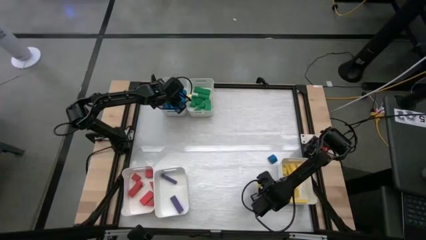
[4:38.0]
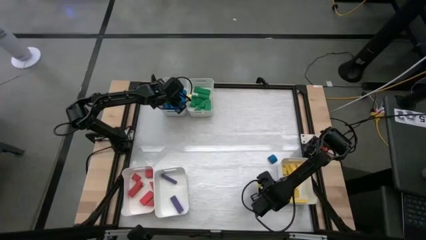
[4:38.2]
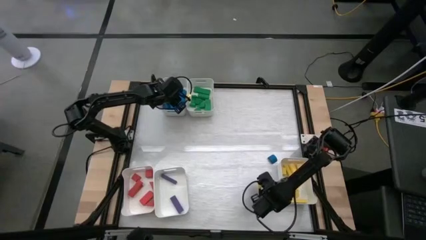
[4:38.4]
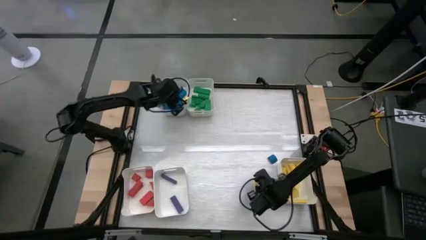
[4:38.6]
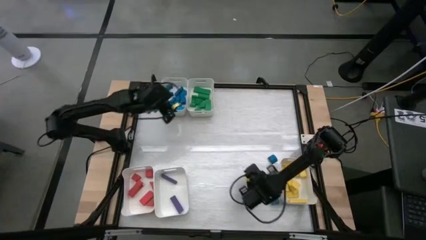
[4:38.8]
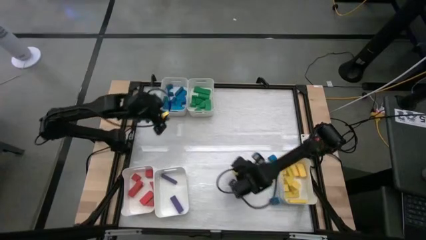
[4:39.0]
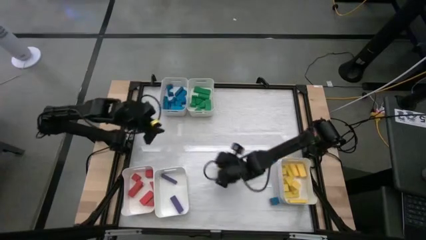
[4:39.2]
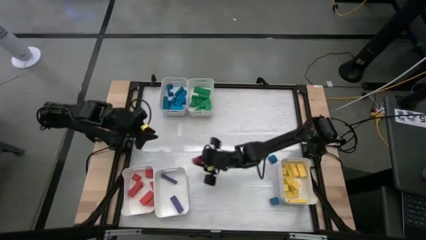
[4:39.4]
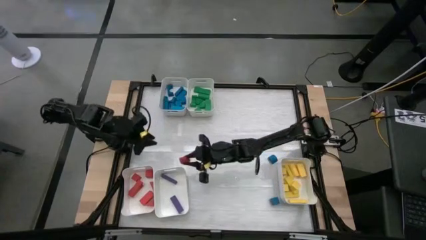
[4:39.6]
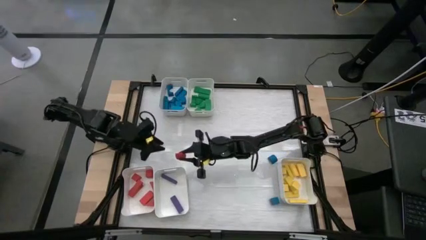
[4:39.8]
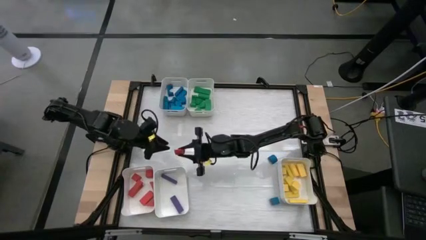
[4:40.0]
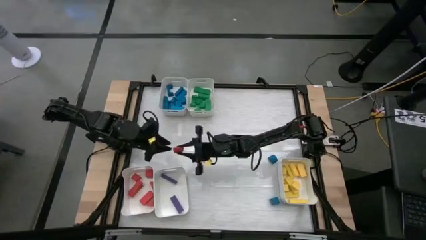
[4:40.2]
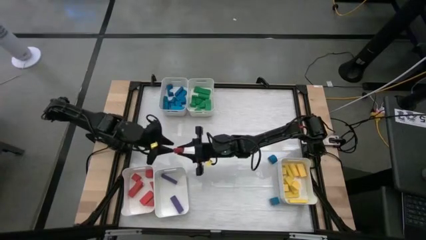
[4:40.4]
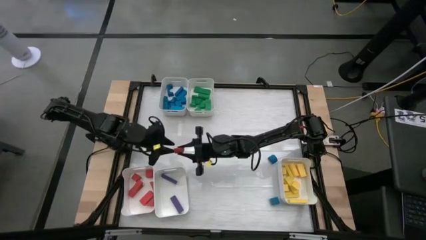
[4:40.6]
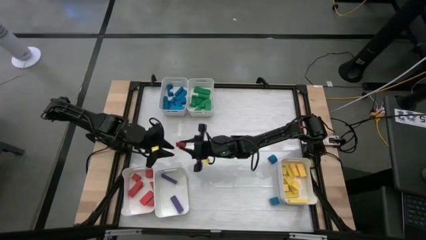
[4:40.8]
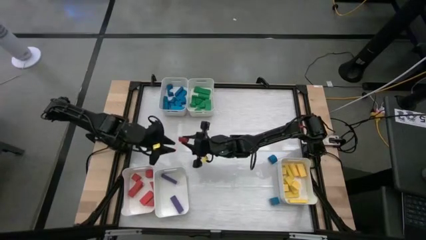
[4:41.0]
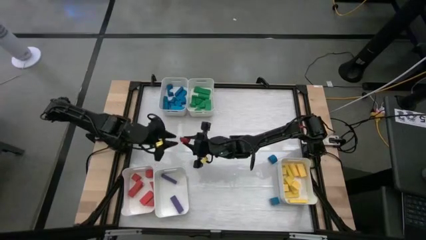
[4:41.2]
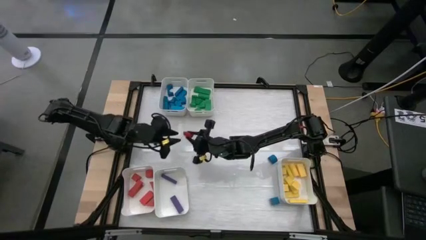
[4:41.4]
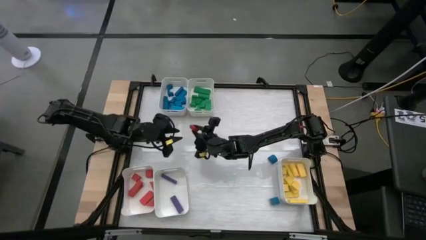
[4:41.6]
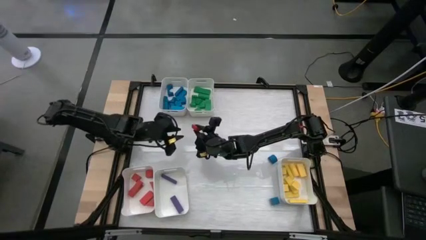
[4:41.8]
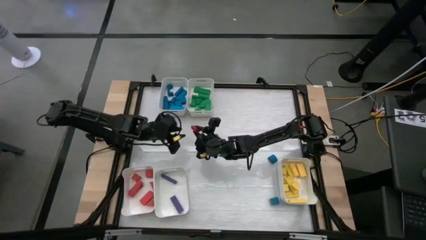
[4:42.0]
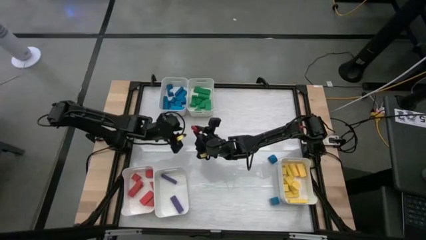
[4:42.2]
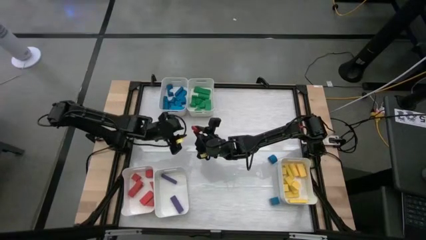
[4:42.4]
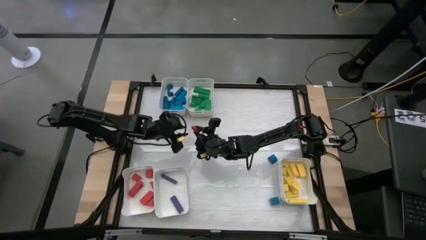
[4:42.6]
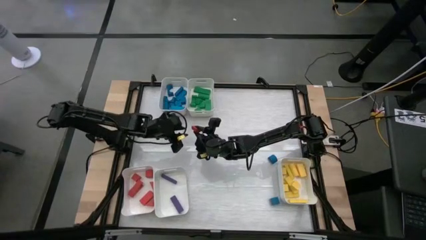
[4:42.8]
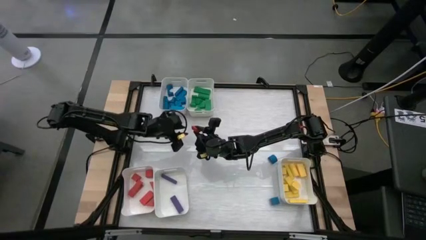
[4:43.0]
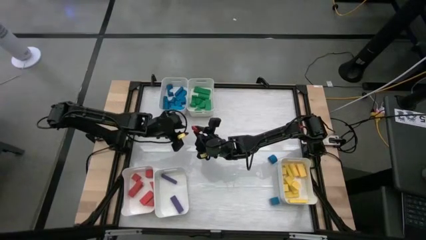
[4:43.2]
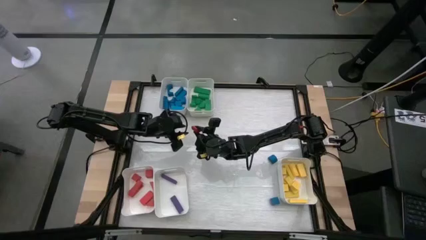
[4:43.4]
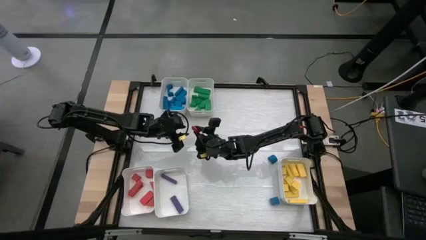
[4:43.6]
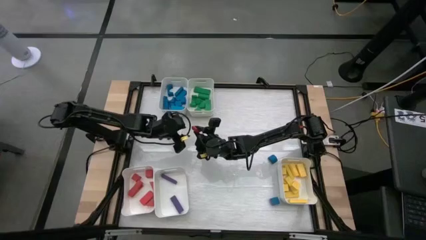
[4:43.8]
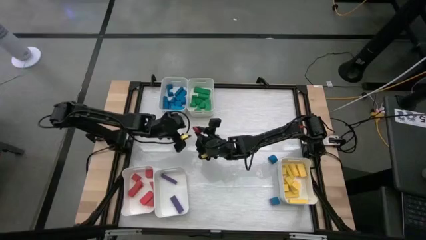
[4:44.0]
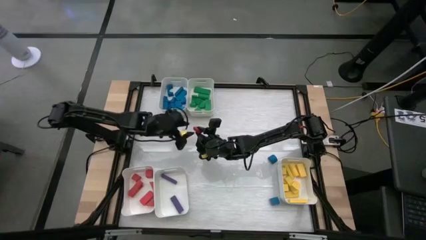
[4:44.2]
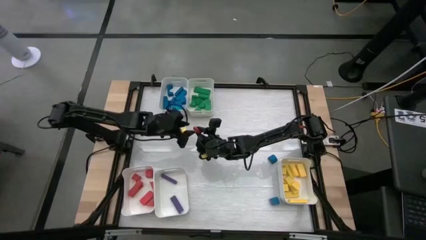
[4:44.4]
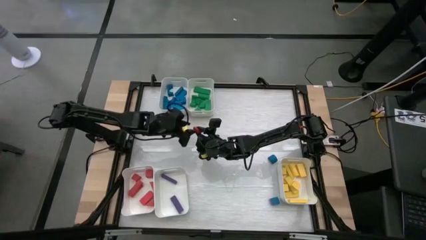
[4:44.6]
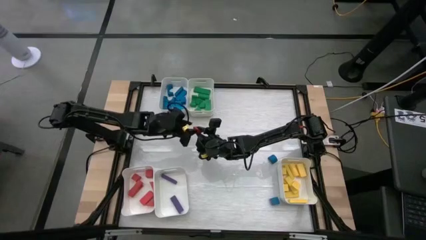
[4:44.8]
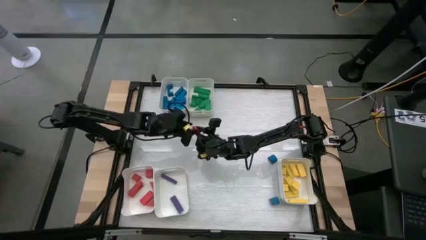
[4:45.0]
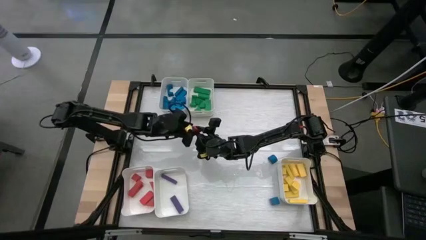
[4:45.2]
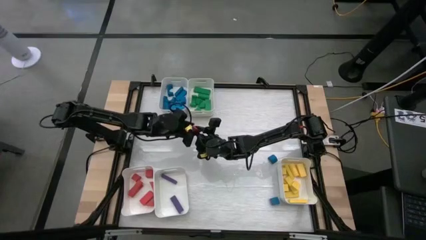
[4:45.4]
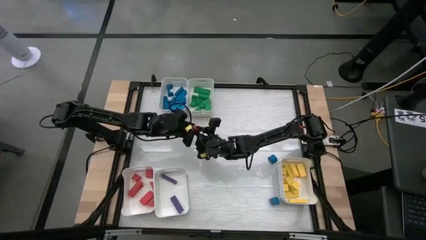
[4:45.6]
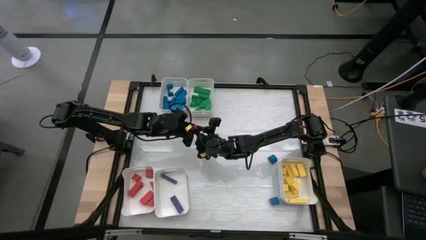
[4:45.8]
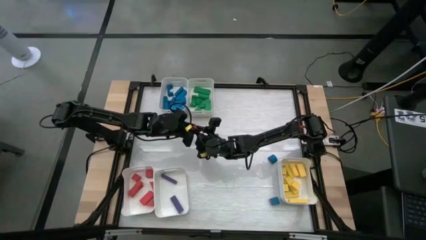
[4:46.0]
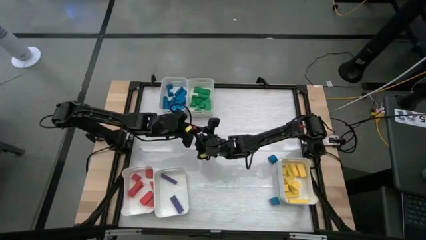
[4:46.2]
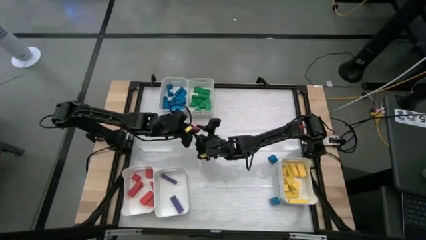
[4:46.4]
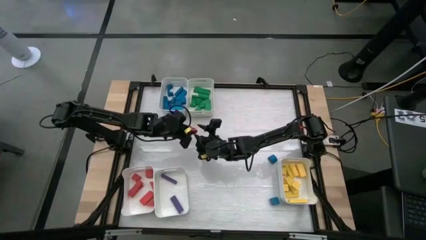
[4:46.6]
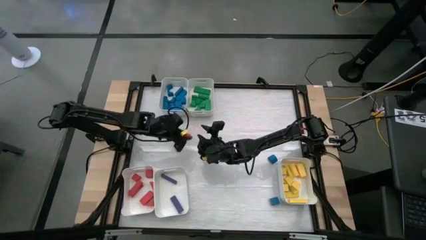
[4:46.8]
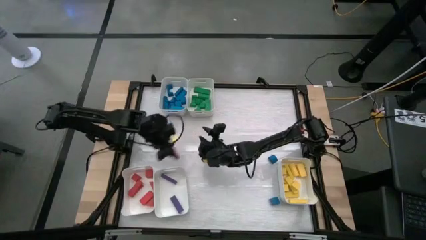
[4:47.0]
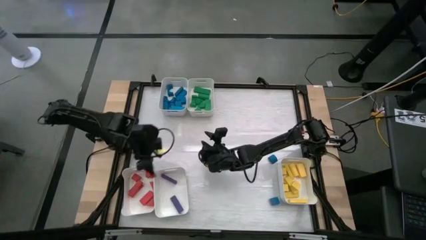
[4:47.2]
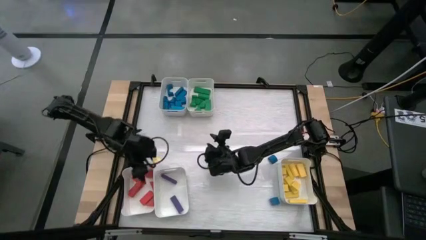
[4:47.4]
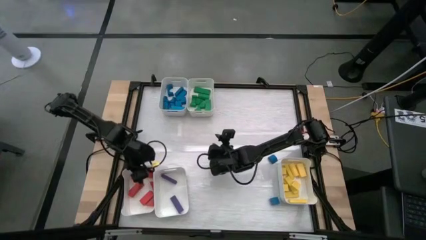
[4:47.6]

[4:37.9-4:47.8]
Task: Sort blocks
Put the red block into the bottom left white bin

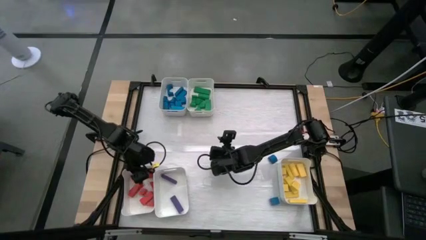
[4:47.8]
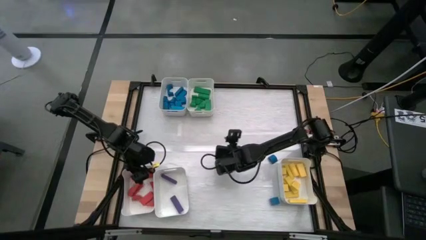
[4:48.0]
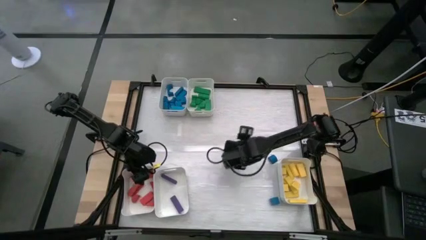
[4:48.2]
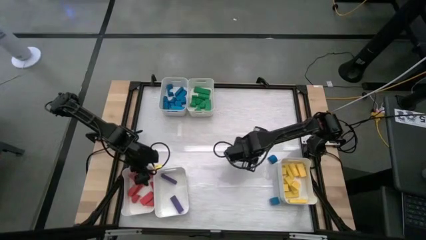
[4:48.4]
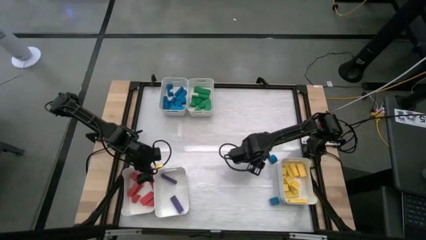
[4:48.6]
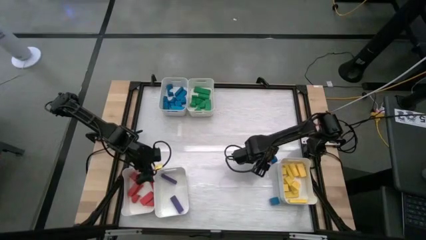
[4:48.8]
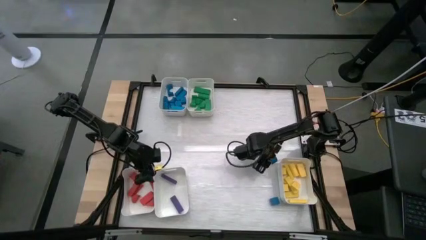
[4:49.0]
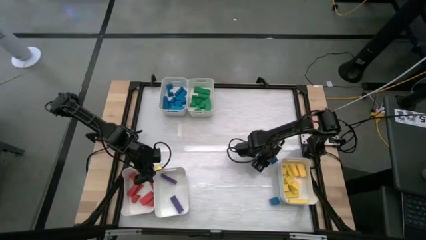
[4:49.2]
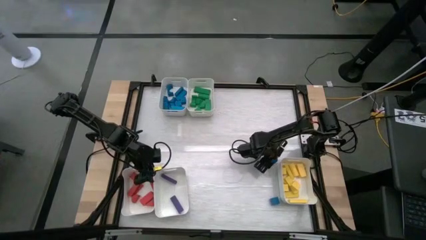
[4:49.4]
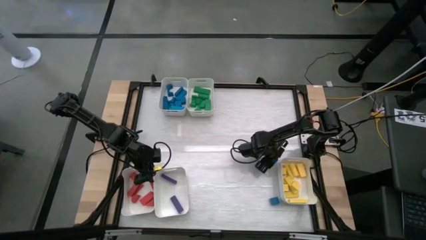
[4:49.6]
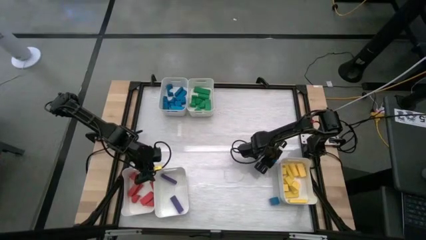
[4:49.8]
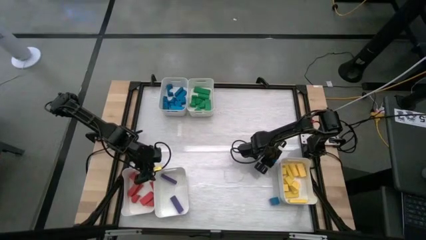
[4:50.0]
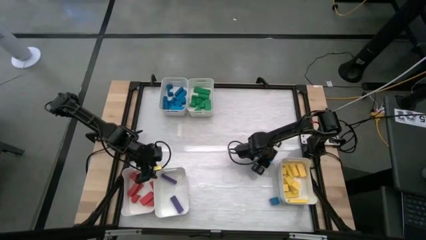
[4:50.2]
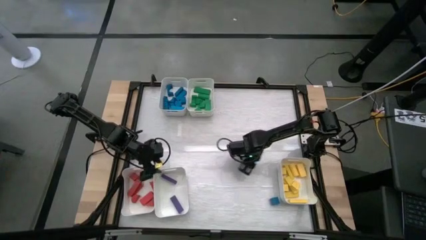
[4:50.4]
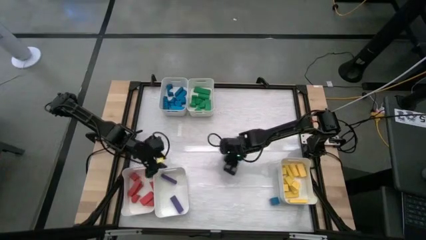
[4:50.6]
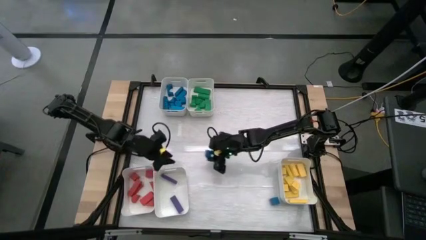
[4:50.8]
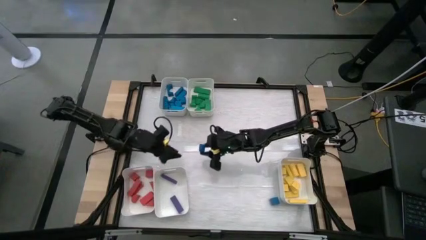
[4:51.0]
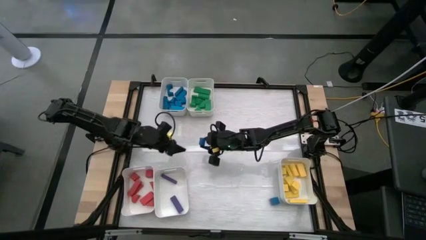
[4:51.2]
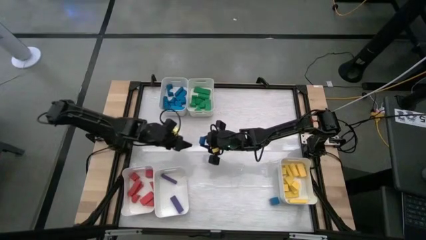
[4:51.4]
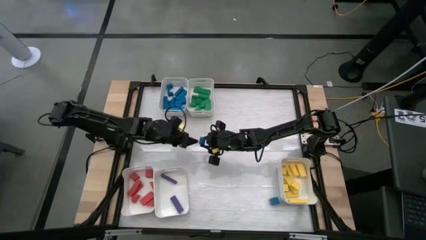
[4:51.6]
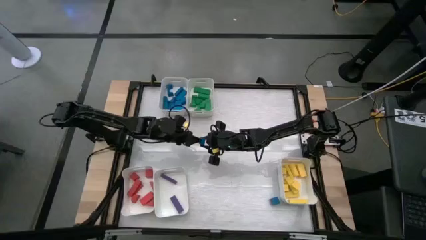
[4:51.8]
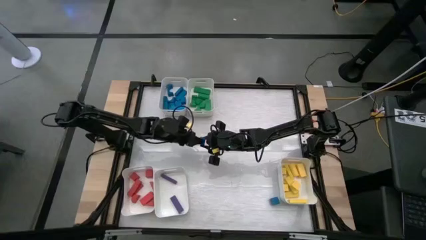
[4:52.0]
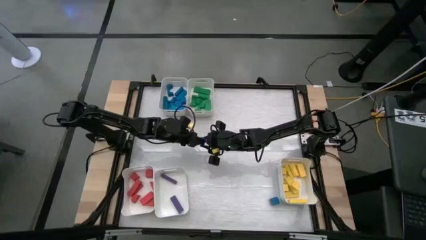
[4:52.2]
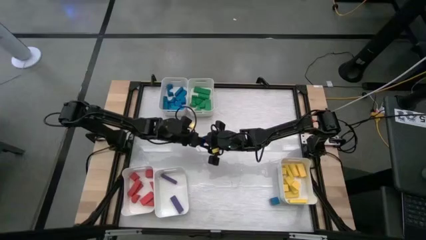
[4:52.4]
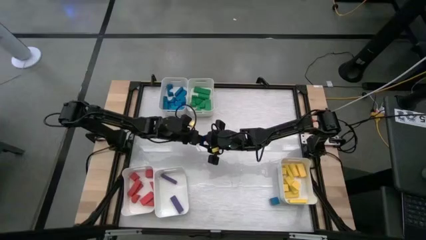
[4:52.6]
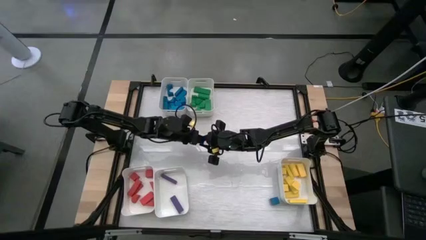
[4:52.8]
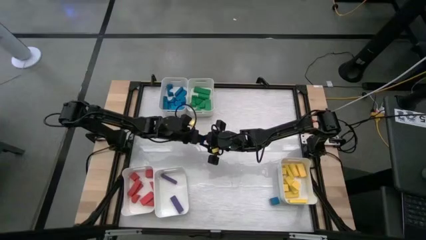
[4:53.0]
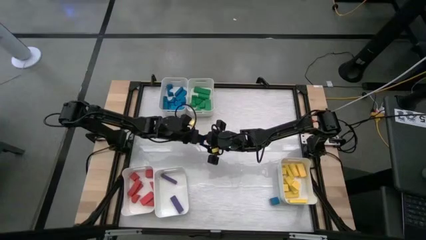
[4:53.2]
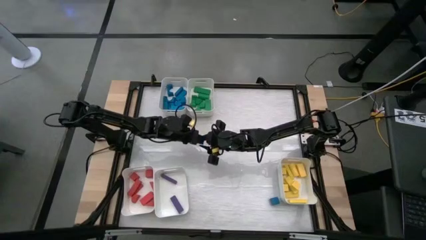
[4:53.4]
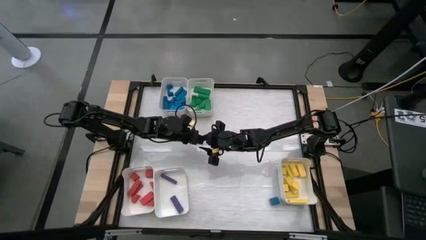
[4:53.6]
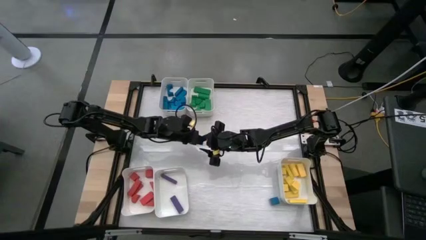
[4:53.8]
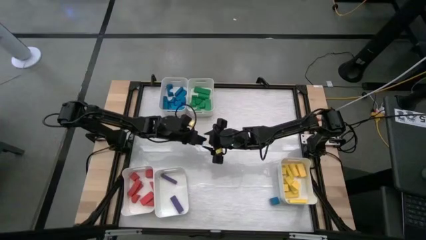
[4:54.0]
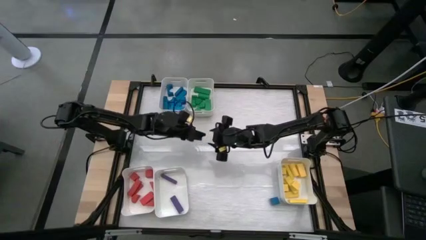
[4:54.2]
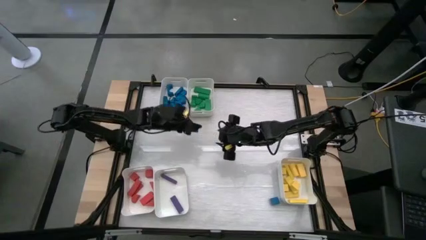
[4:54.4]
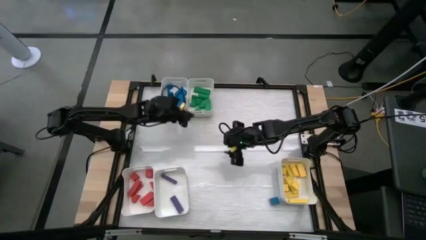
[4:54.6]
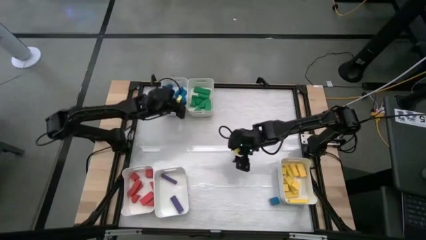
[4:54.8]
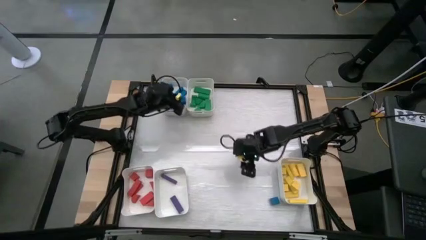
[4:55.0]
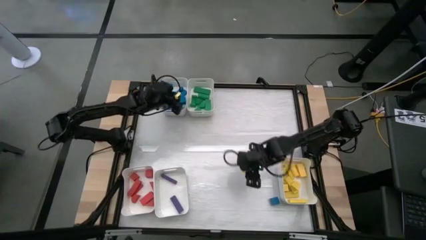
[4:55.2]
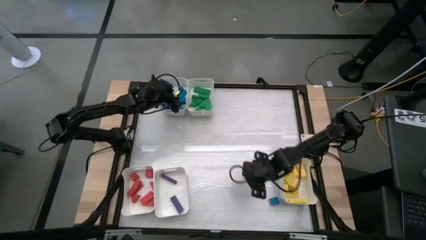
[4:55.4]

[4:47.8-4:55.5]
Put the blue block into the top left white bin
